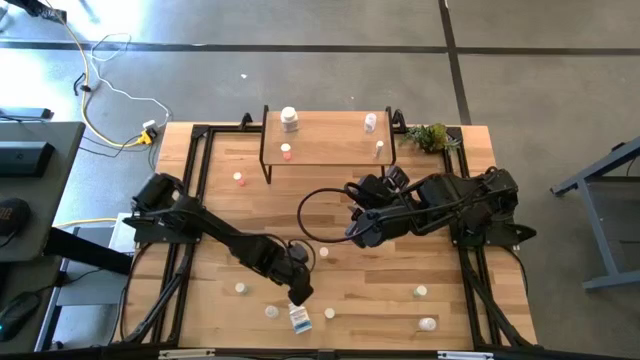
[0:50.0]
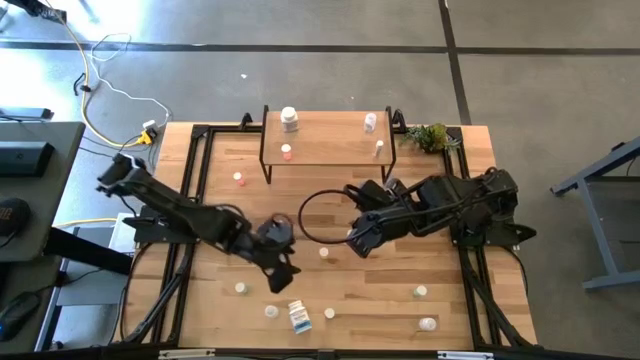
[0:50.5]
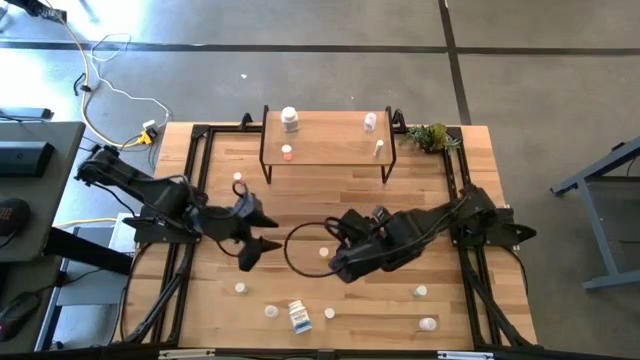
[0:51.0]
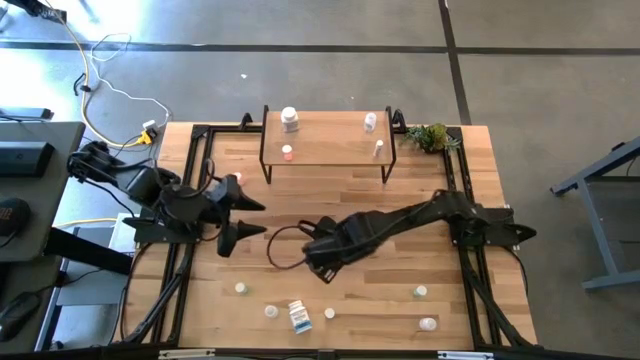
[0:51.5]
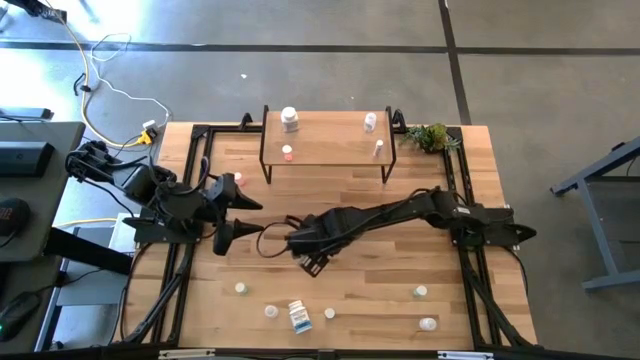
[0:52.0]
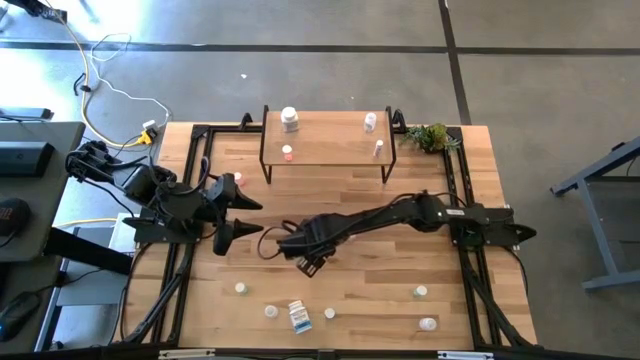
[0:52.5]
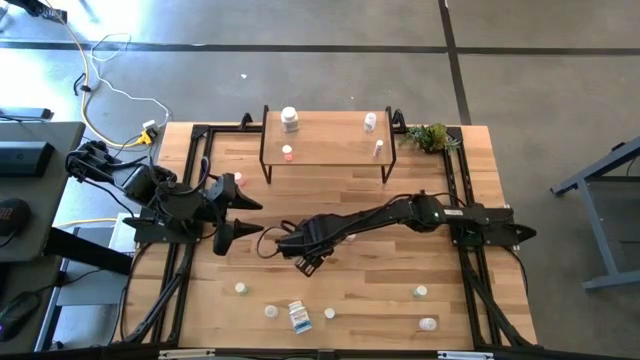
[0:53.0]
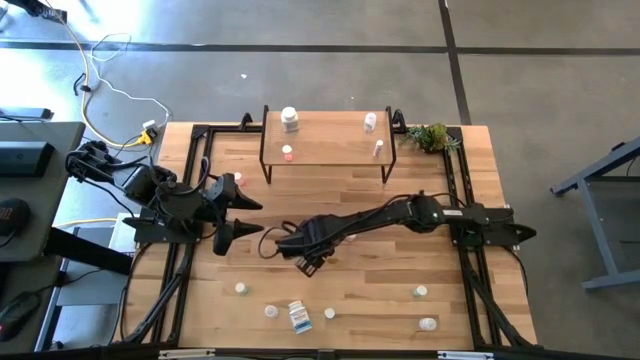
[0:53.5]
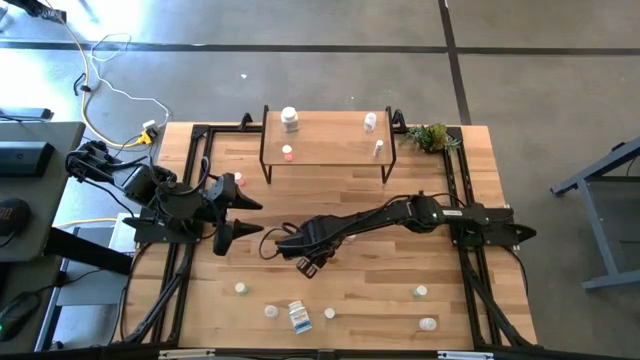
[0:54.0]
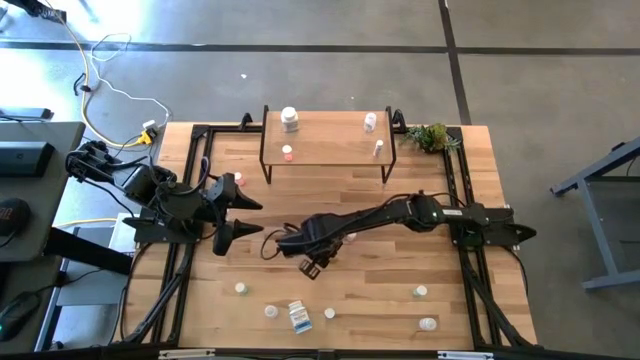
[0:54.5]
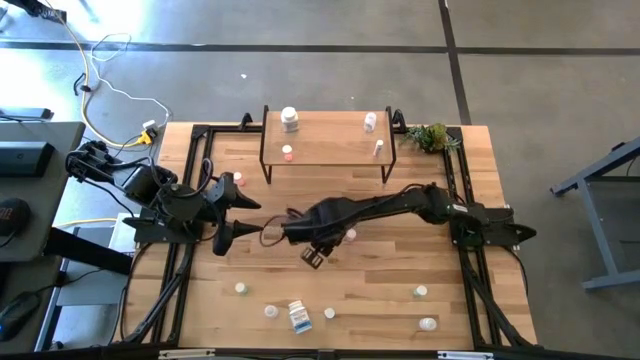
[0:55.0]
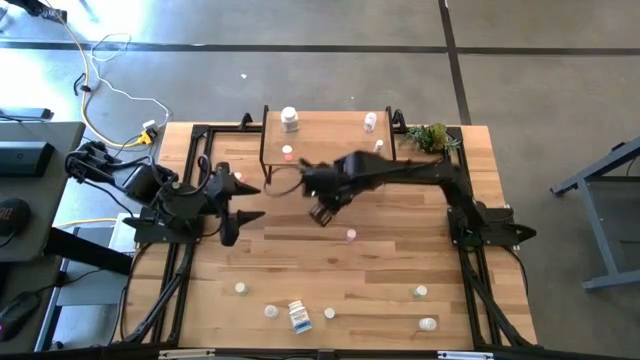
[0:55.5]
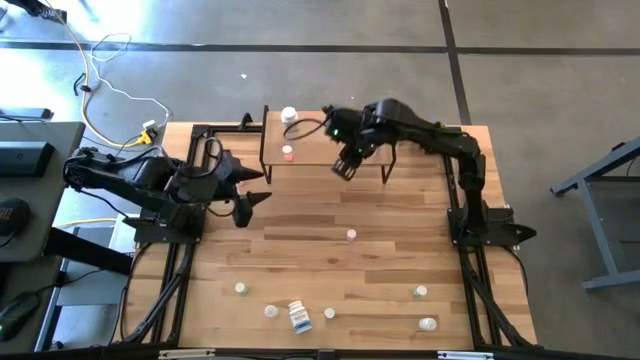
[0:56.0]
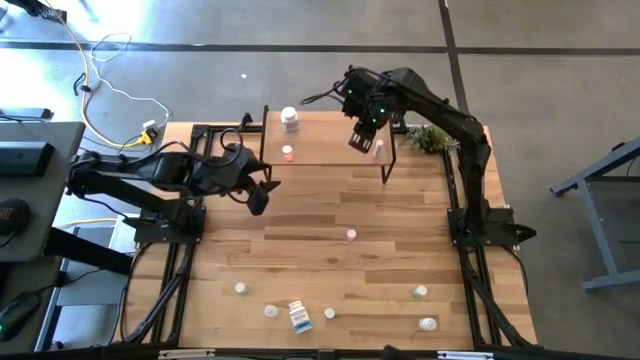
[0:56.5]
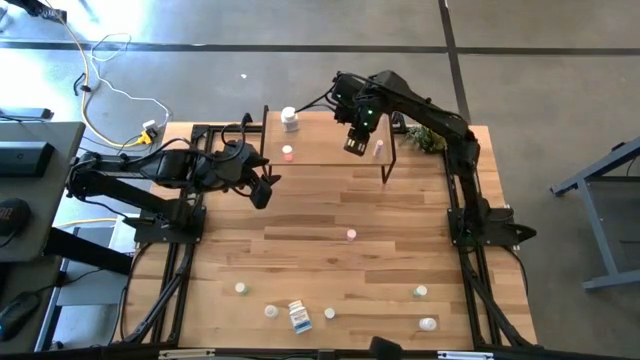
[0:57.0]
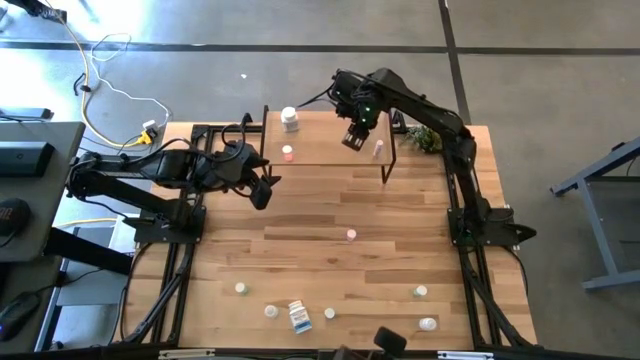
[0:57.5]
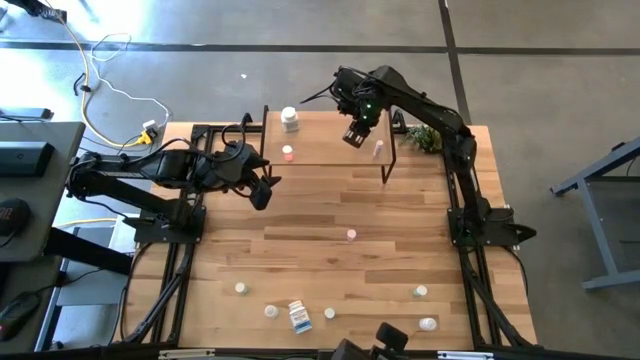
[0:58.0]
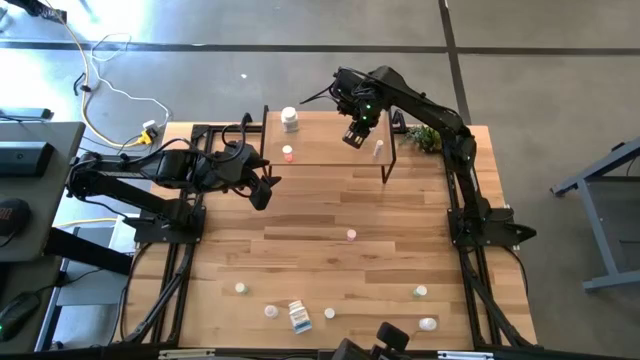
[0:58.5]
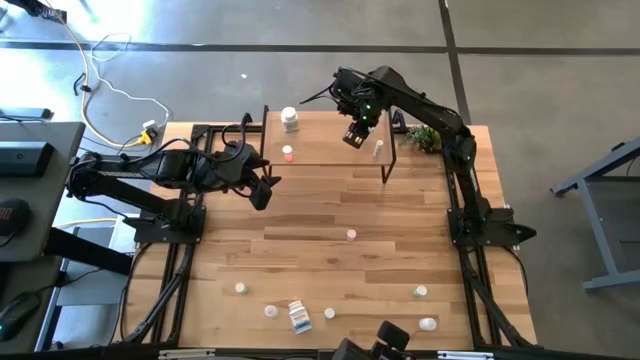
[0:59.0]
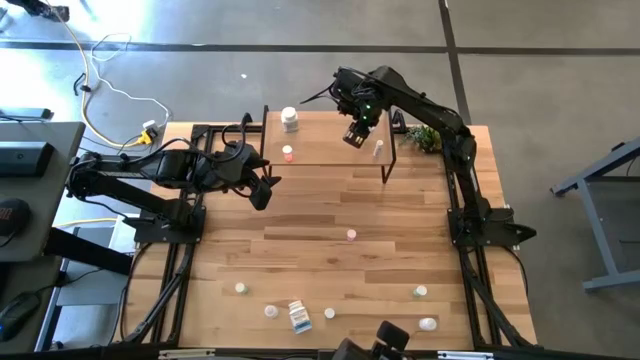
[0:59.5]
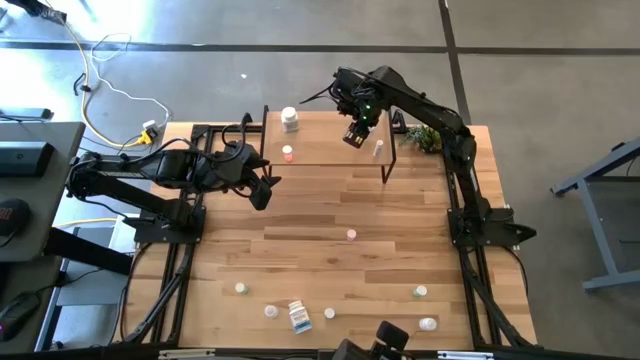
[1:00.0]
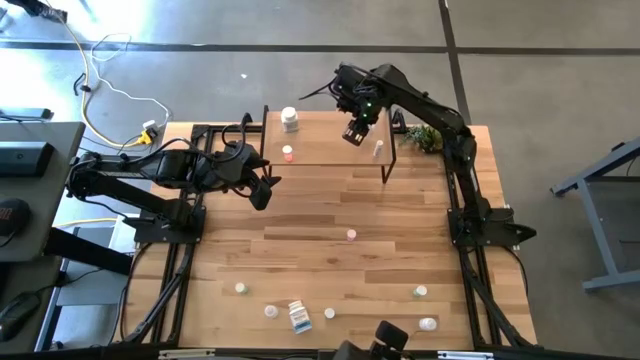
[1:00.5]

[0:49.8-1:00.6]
Task: Pick and place medicine bottles onto shelf by color
Put the yellow pill bottle on the shelf

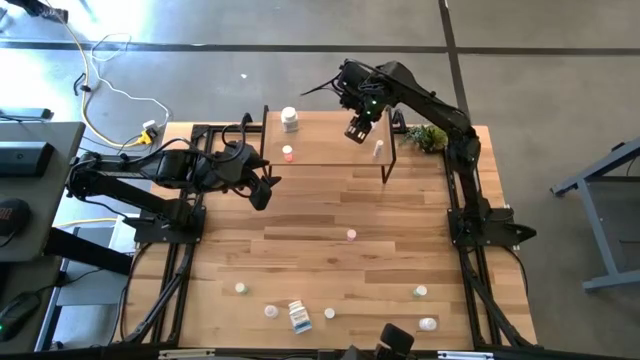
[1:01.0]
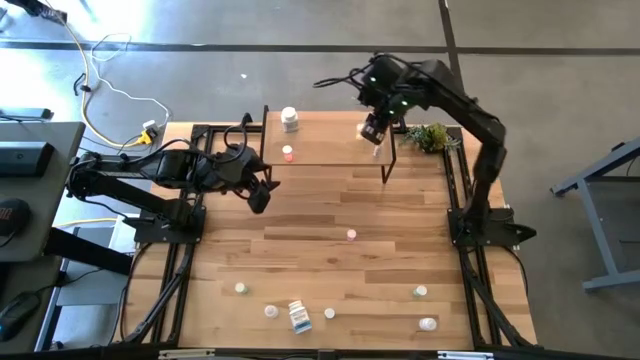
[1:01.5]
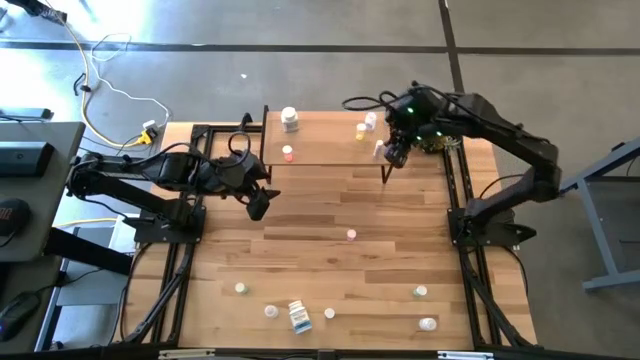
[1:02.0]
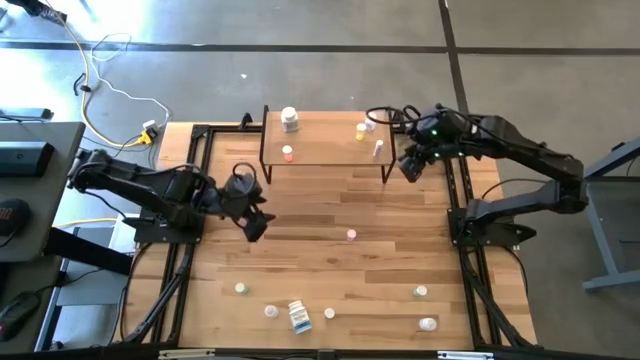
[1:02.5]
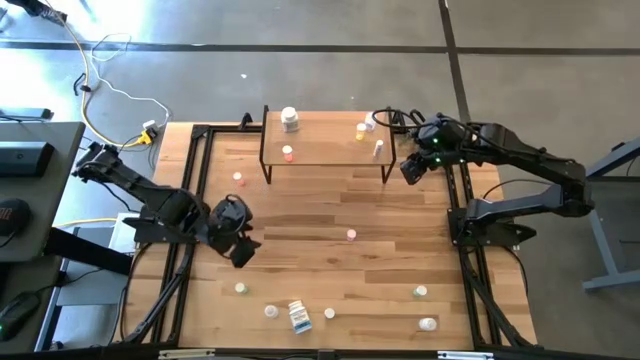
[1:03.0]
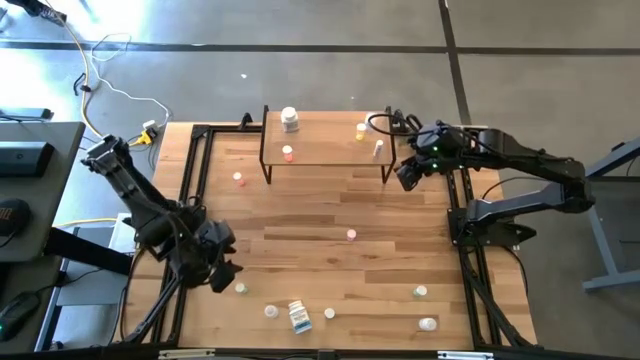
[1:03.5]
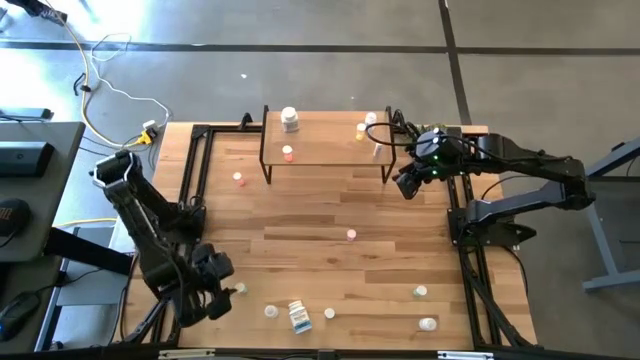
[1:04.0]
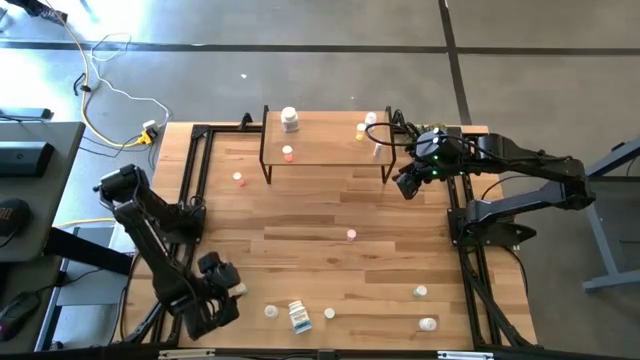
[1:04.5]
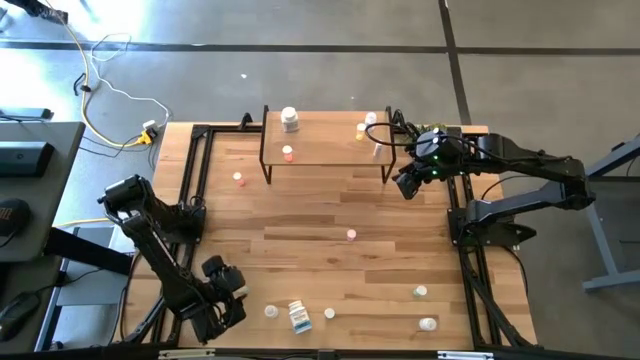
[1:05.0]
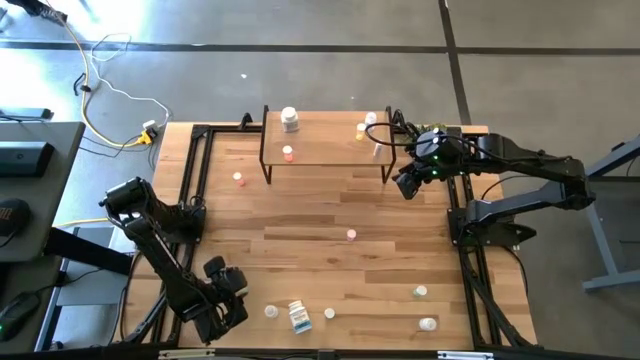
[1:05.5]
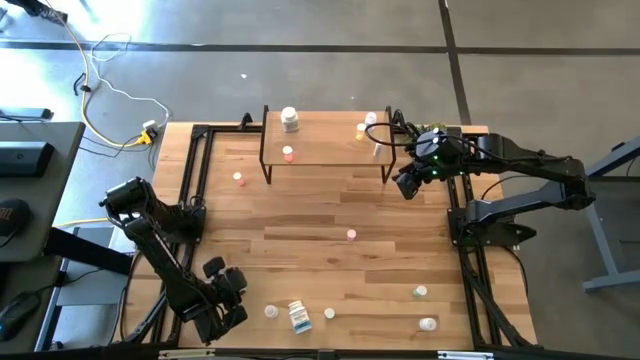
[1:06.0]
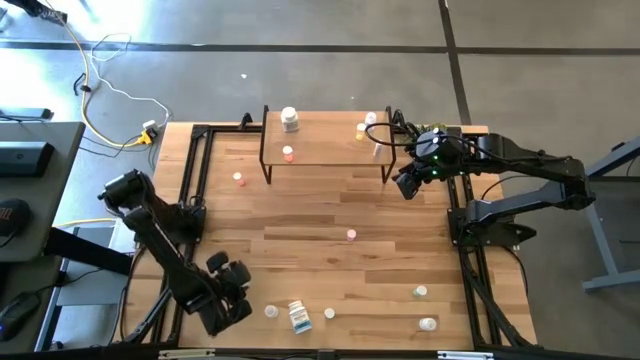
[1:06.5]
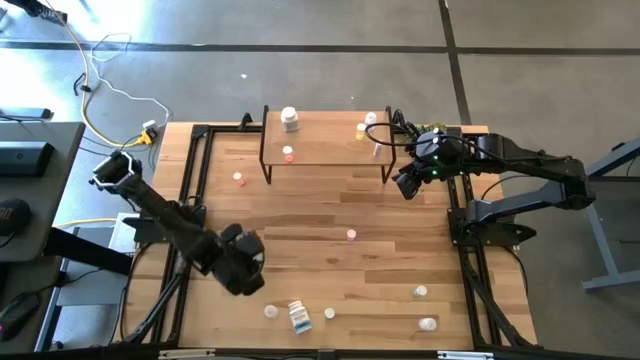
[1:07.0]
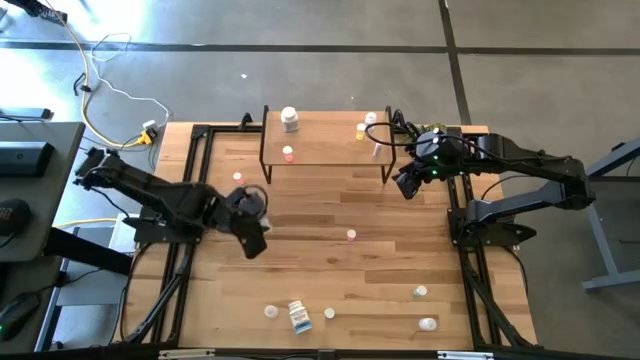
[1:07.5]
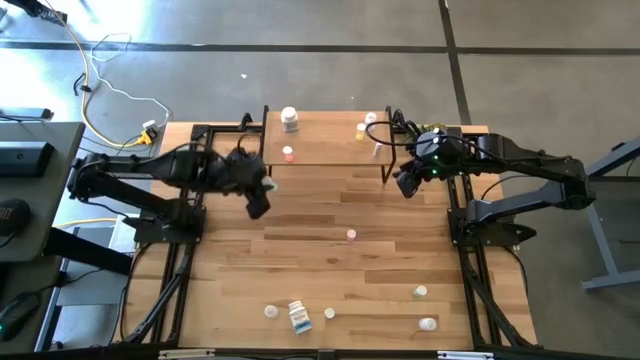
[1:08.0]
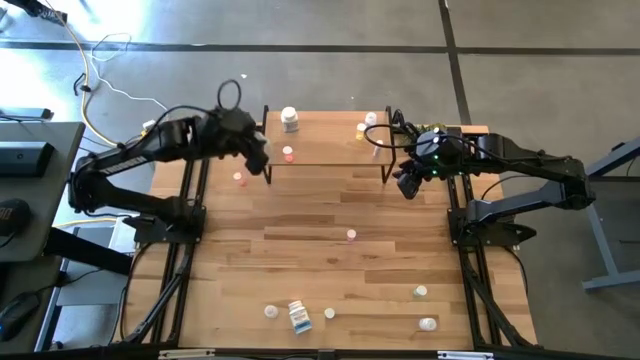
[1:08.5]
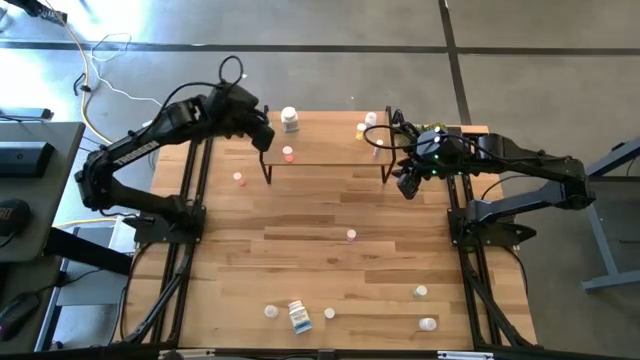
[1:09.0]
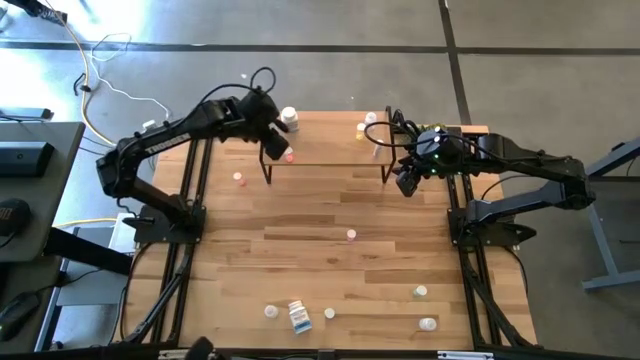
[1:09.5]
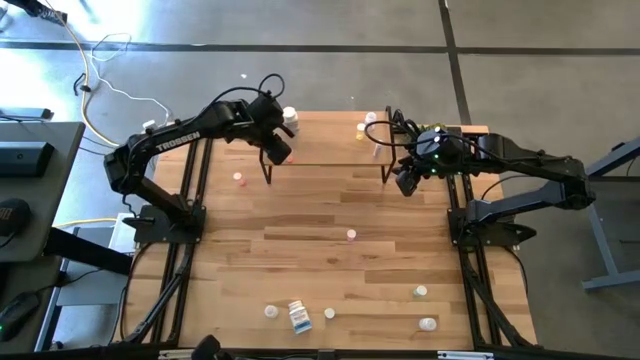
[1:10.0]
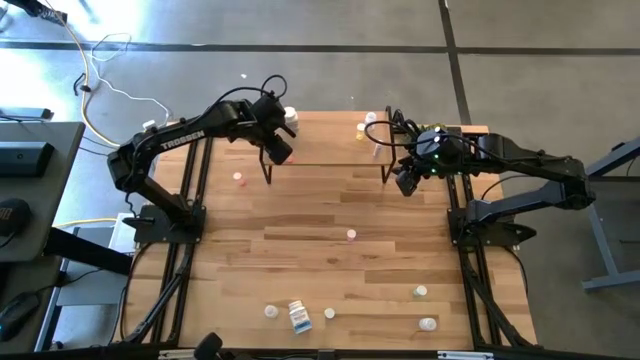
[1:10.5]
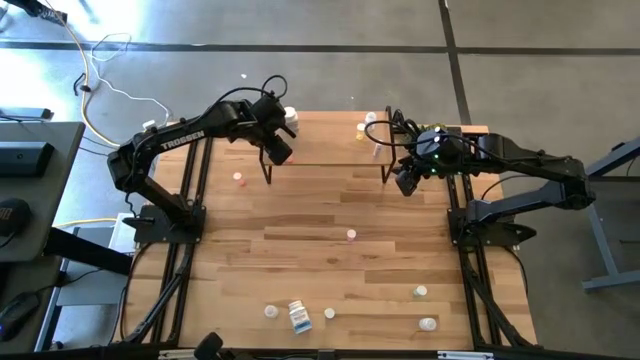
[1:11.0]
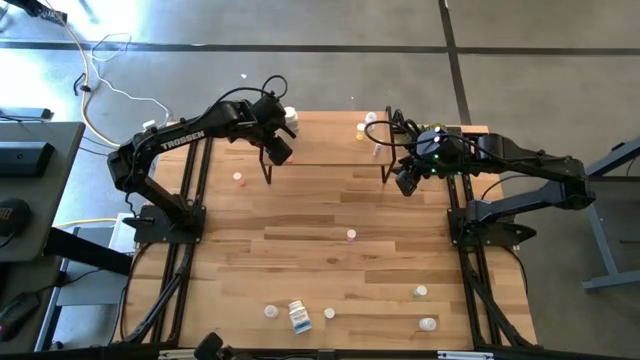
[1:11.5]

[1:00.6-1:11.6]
Put the left blue pill bottle on the shelf
